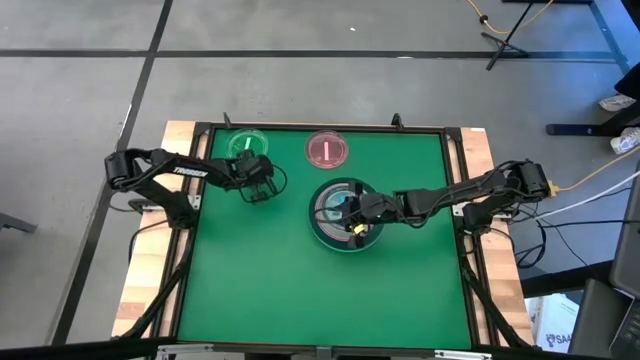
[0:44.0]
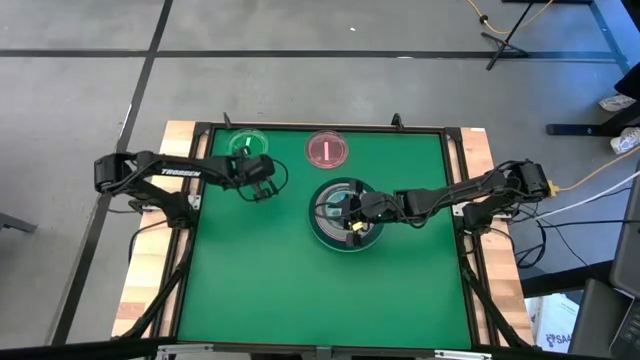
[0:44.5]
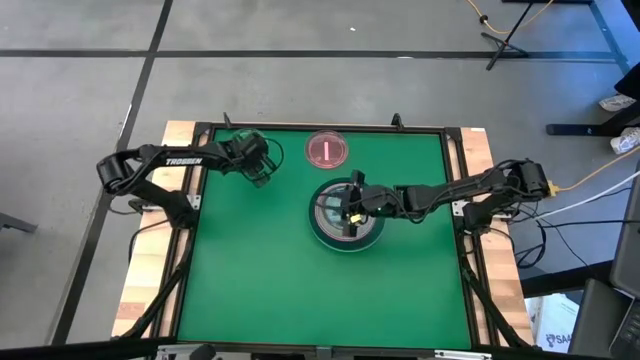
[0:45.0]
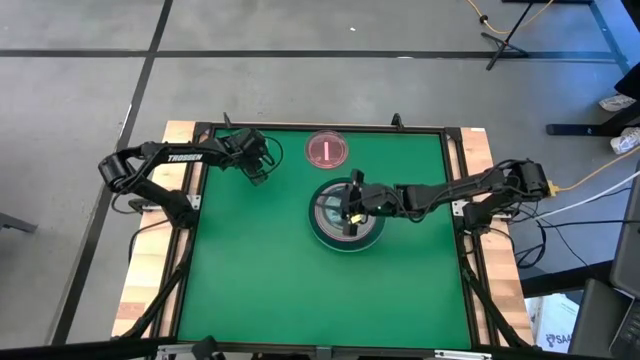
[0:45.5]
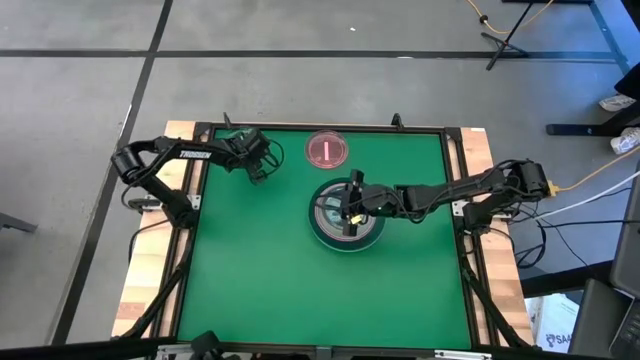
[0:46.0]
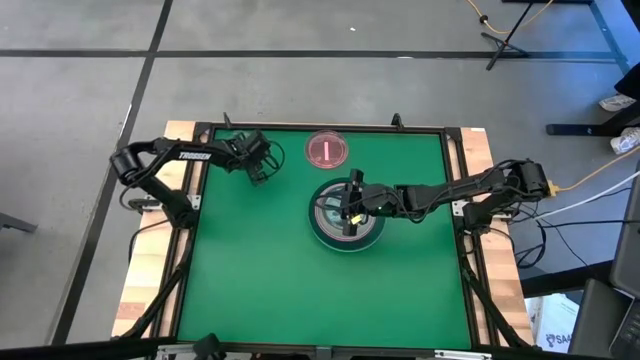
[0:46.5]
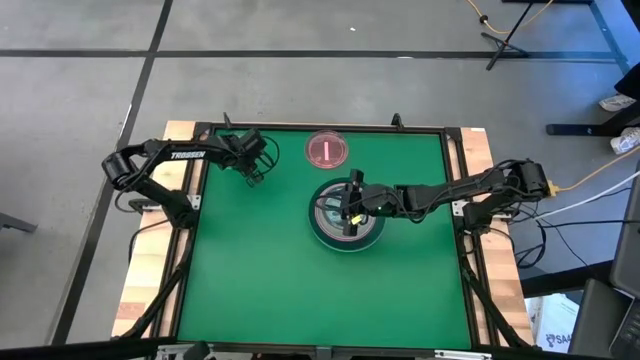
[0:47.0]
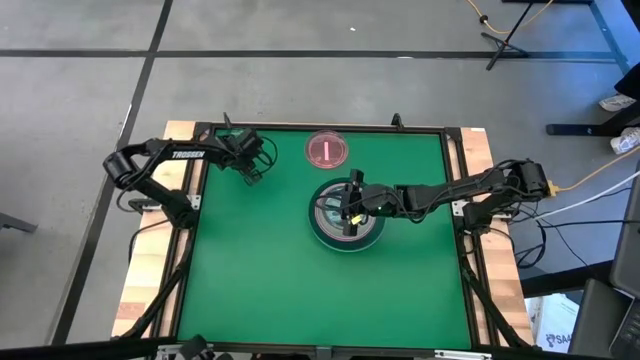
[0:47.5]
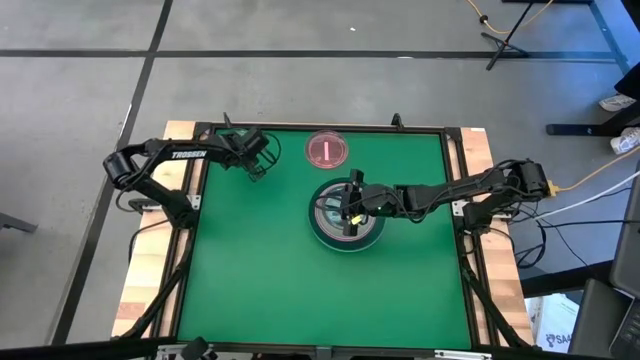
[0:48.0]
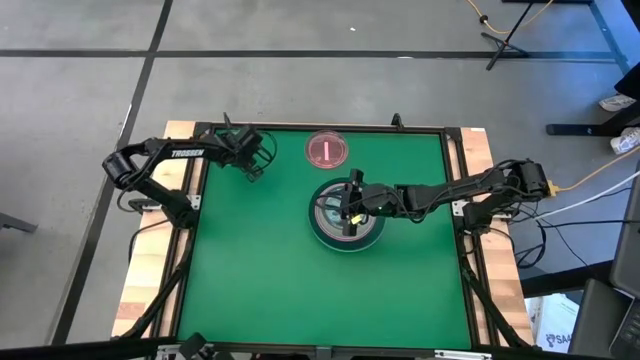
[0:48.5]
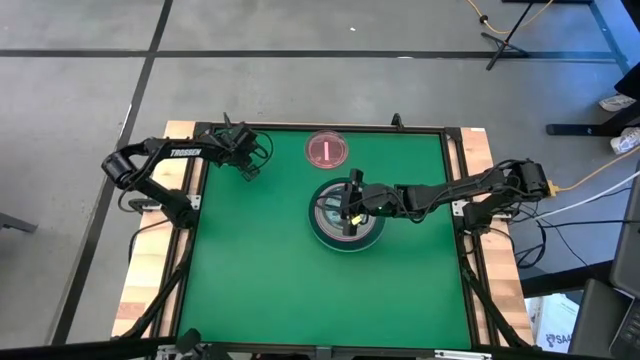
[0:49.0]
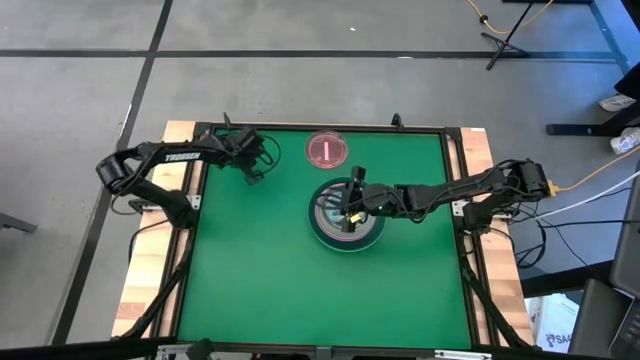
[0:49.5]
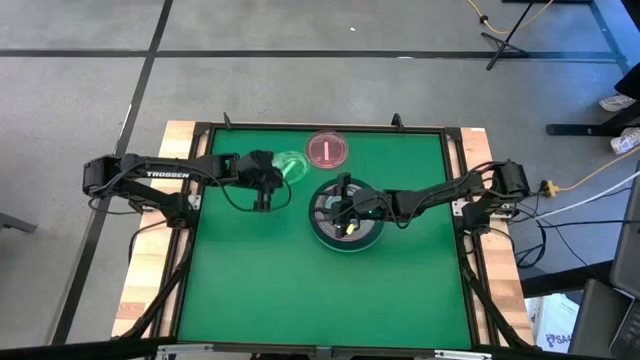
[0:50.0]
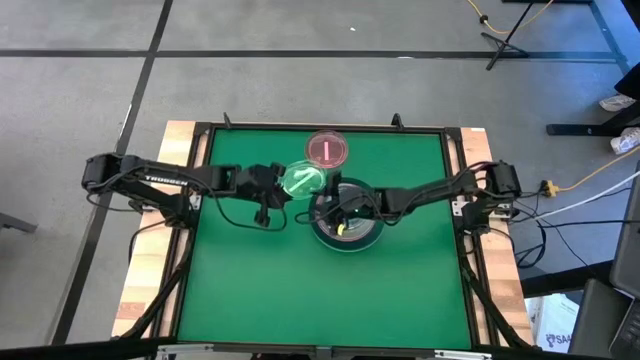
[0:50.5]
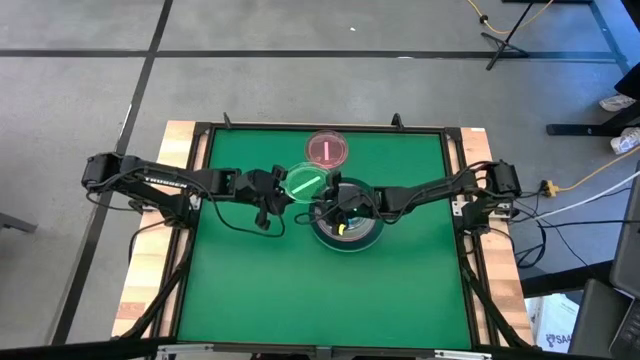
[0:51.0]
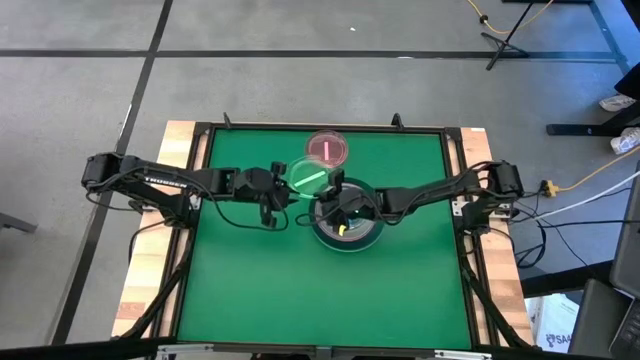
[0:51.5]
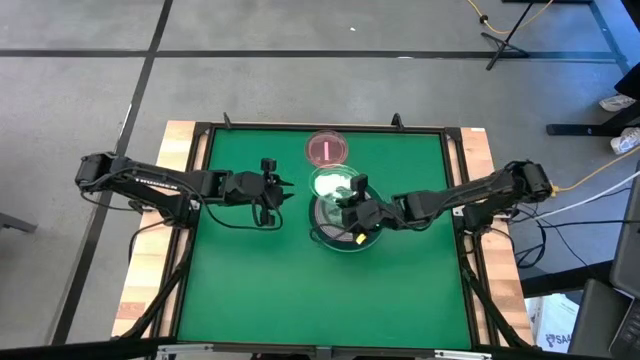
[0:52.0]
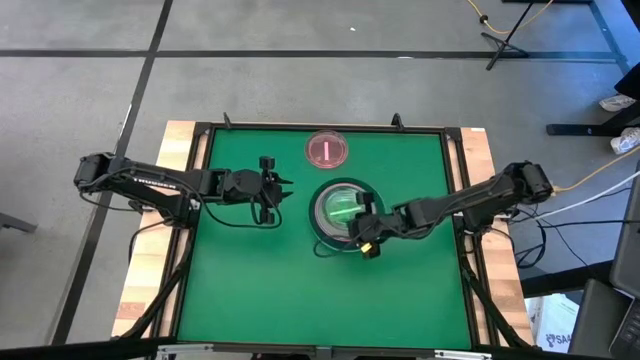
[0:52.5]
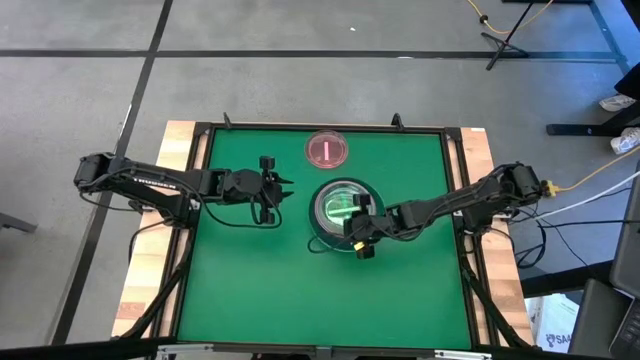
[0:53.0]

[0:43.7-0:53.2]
Task: Stack plastic plates
Stack the green plate on top of the blue plate

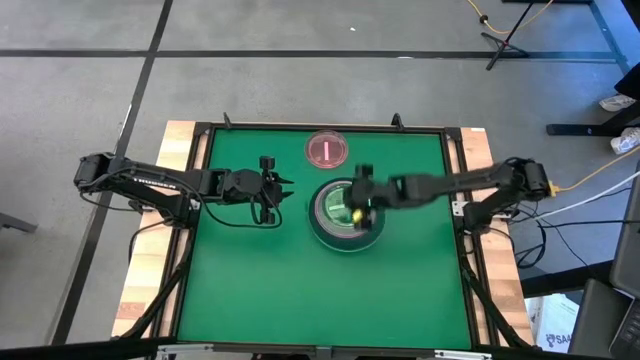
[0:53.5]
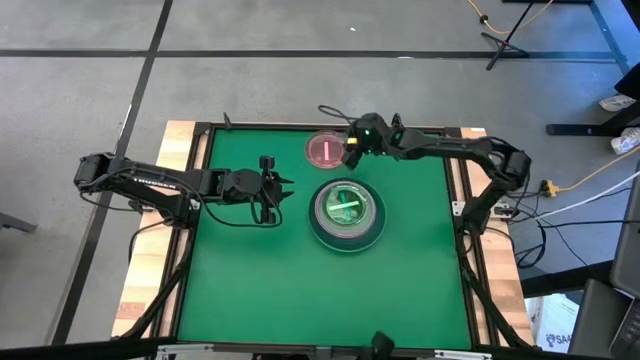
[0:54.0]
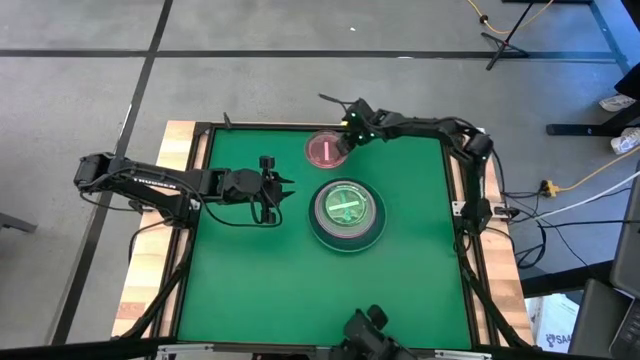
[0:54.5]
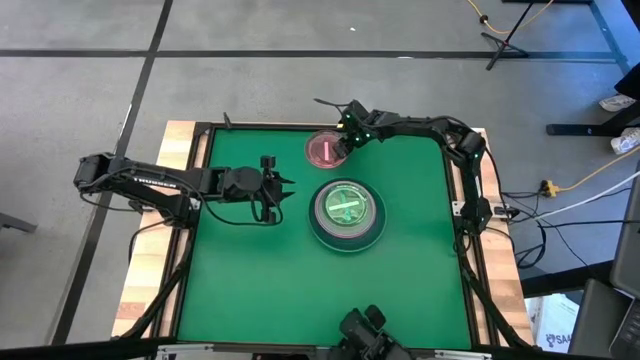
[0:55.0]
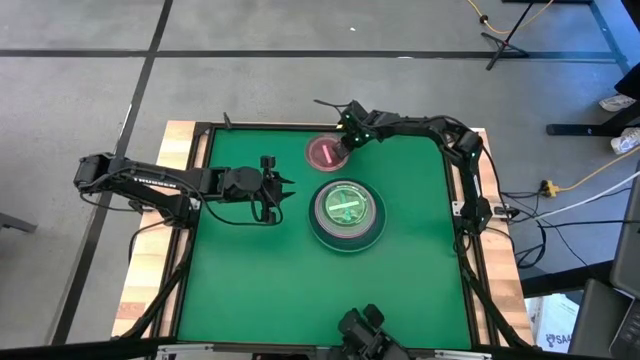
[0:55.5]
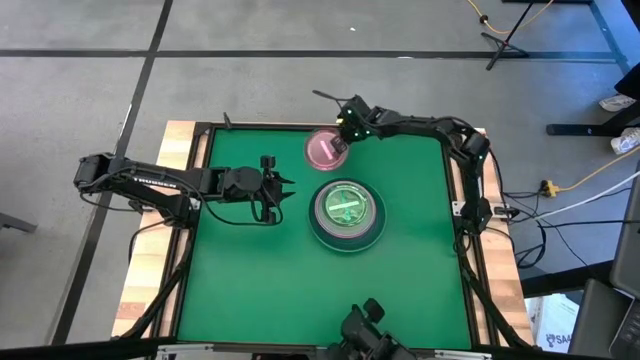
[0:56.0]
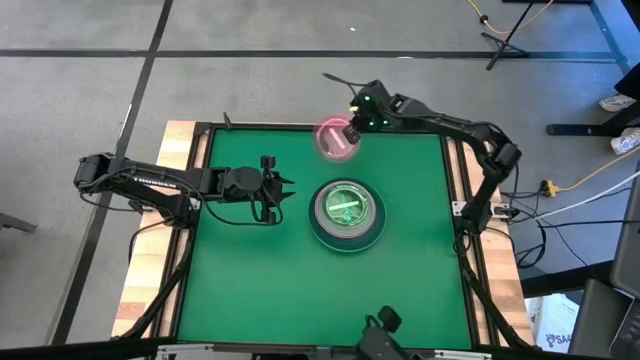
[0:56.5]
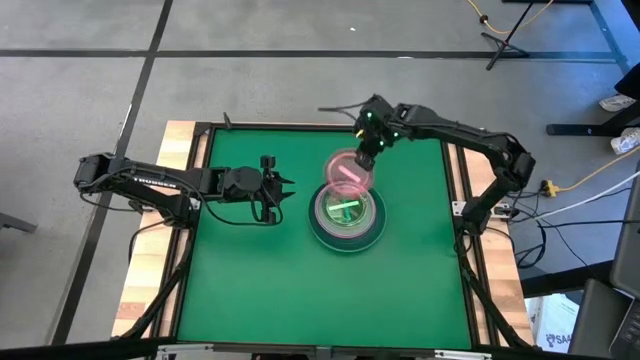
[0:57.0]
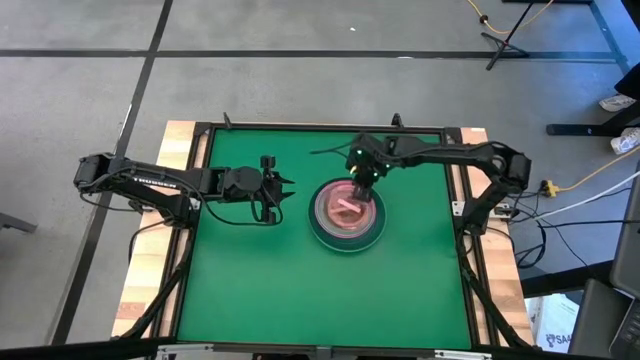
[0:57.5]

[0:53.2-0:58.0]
Stack the light pink plate on top of the green plate

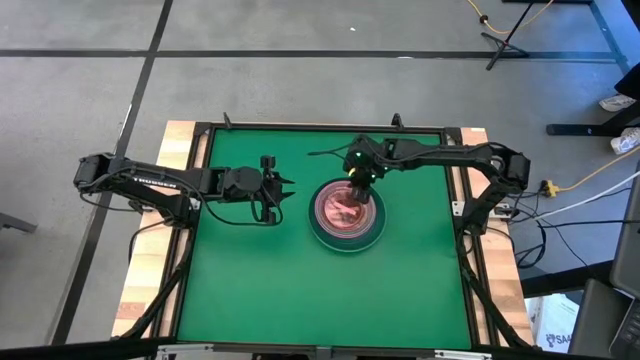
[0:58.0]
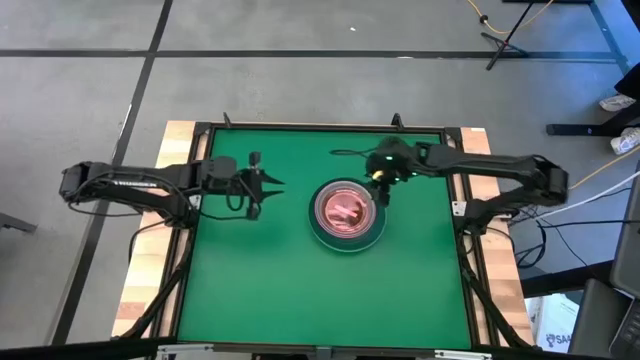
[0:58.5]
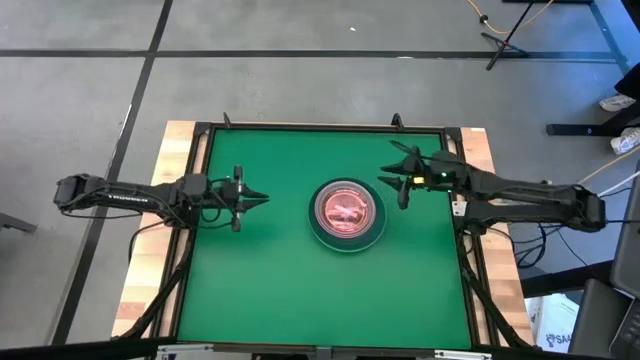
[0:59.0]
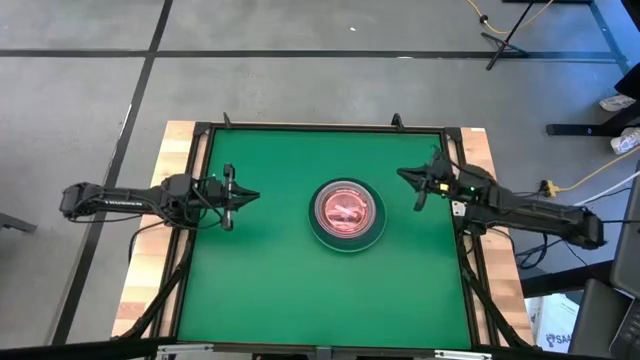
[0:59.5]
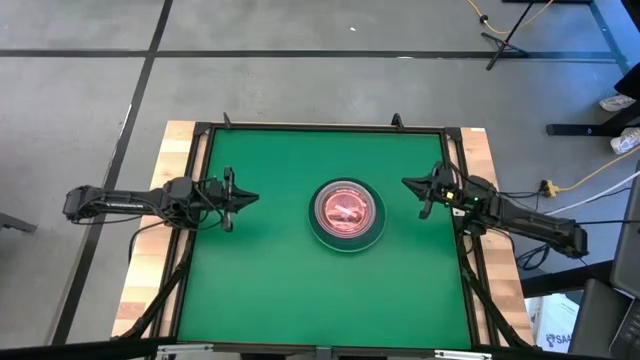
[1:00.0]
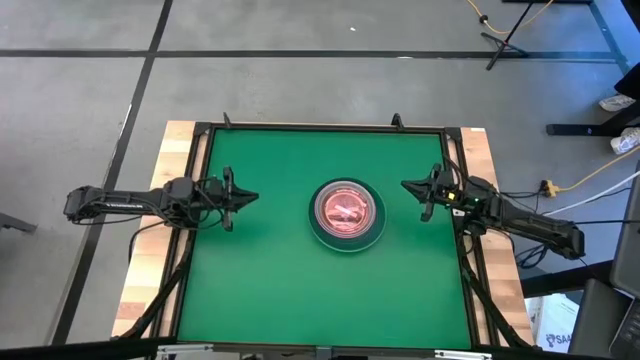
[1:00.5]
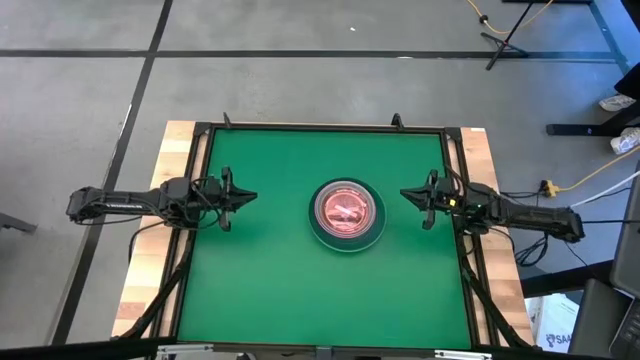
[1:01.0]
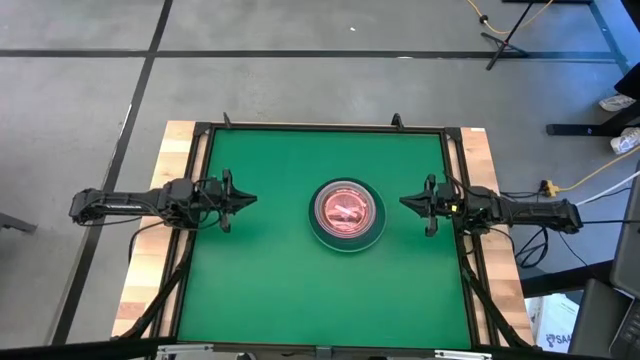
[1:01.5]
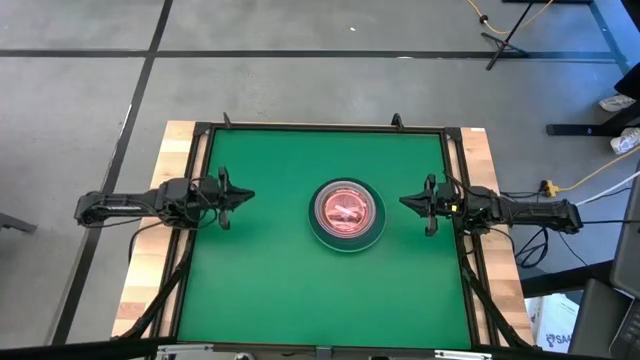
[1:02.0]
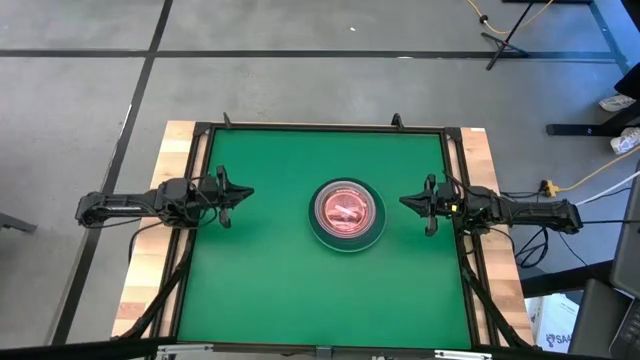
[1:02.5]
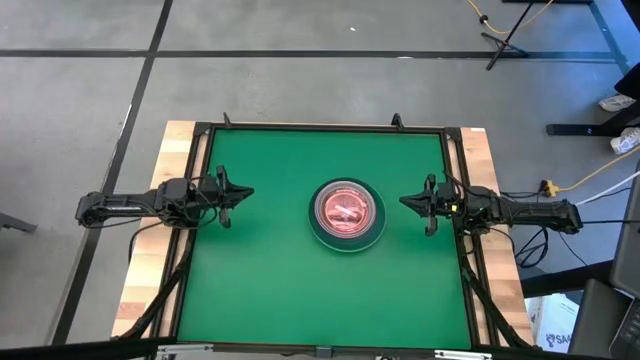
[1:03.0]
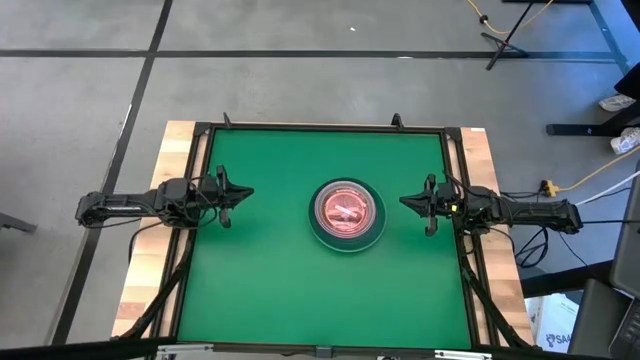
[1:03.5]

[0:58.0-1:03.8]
Return to Home Position

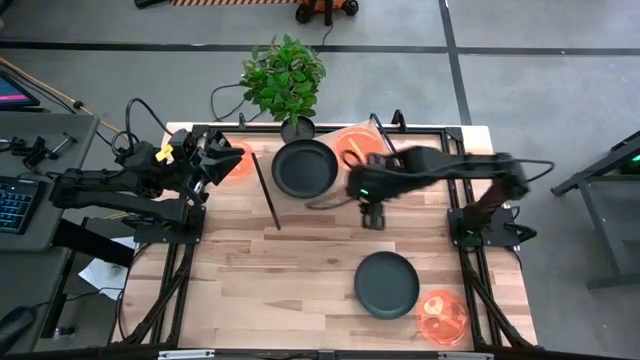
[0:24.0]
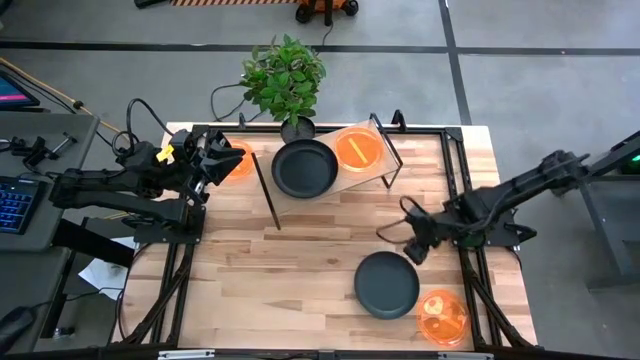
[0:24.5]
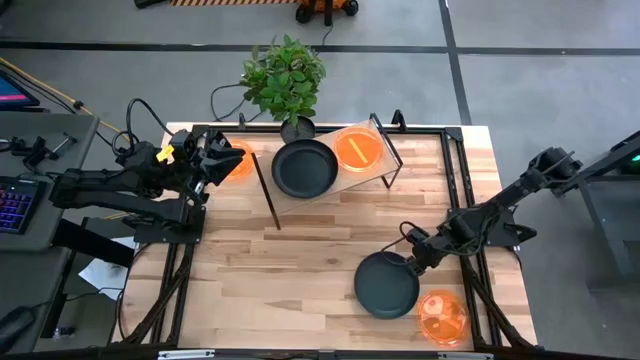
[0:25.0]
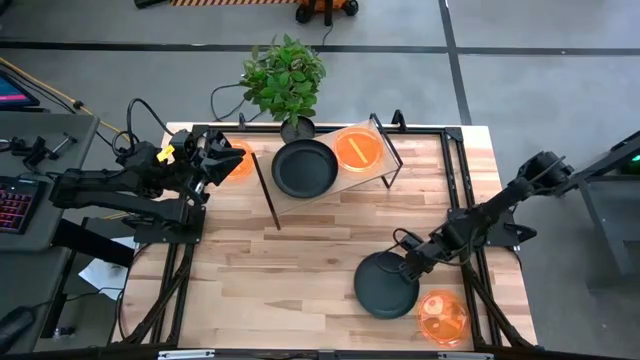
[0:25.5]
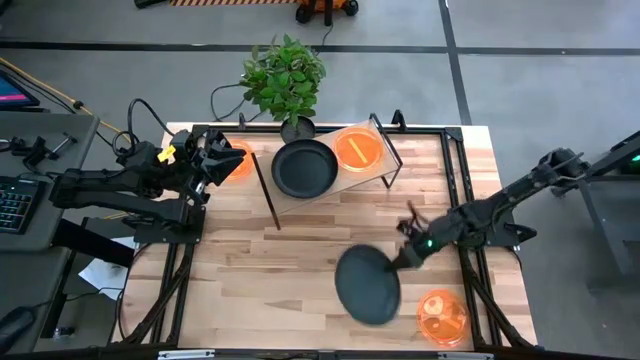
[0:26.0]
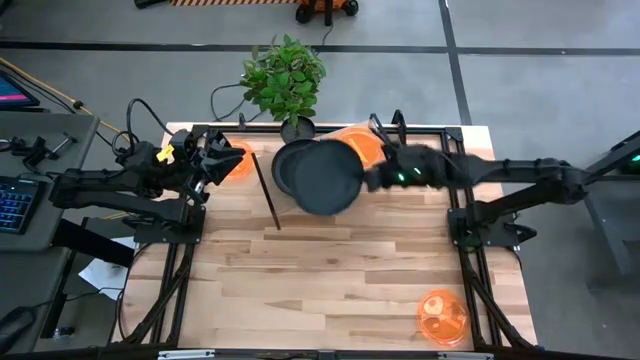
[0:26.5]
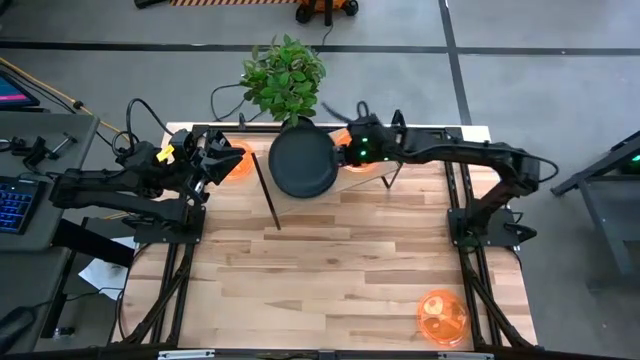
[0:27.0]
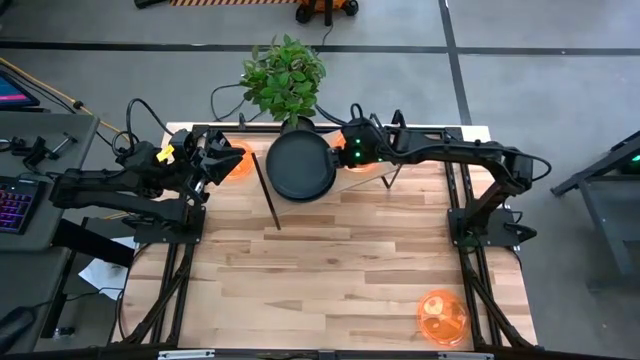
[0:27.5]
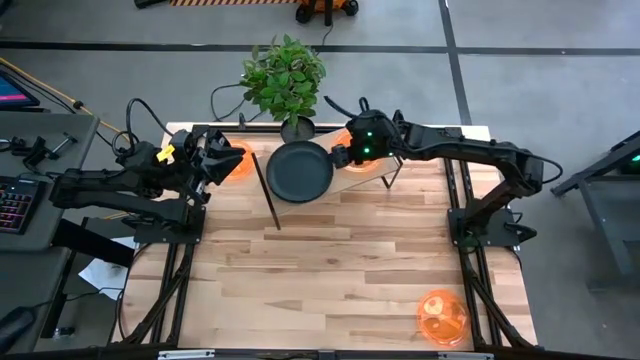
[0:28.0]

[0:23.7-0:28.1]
Task: Place and stack plates onto a shelf
Stack the black plate on top of the black plate on the shelf
